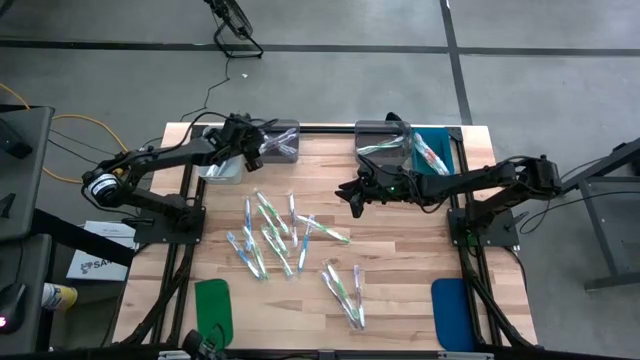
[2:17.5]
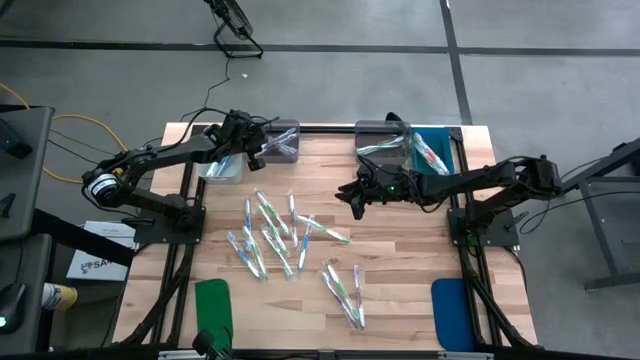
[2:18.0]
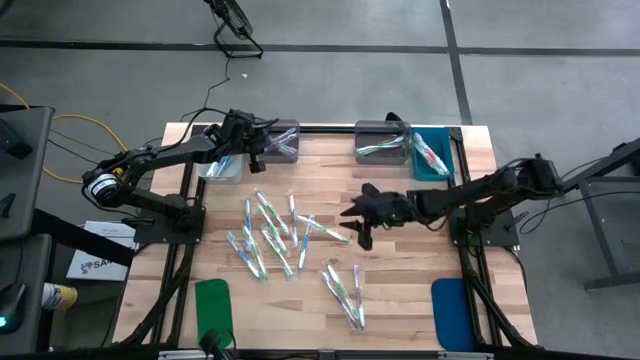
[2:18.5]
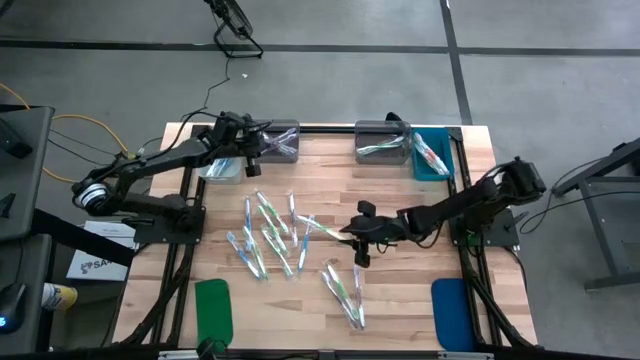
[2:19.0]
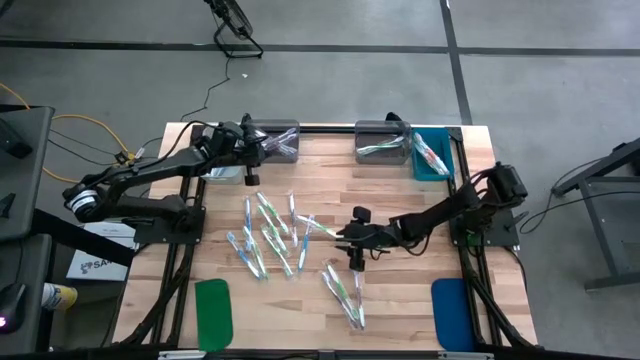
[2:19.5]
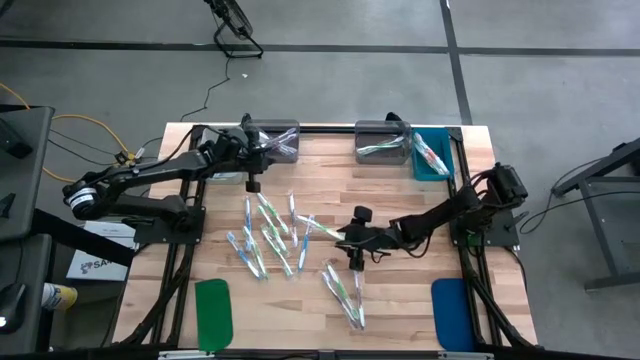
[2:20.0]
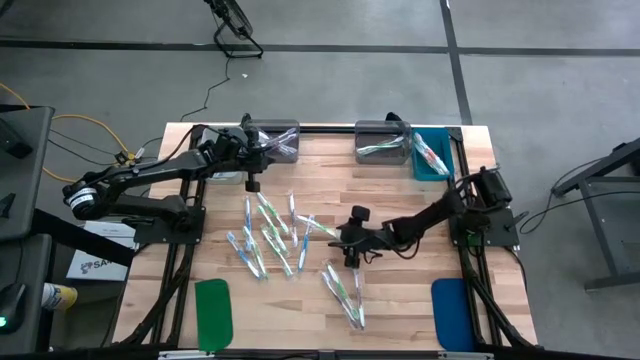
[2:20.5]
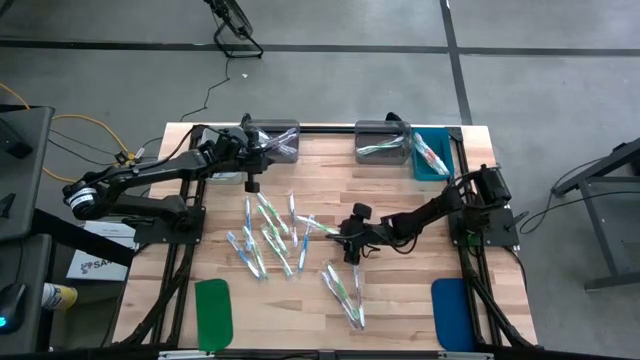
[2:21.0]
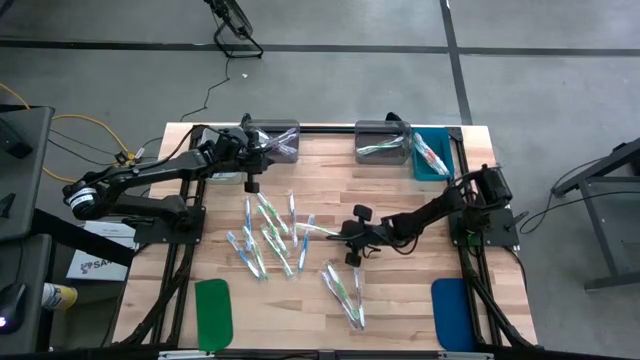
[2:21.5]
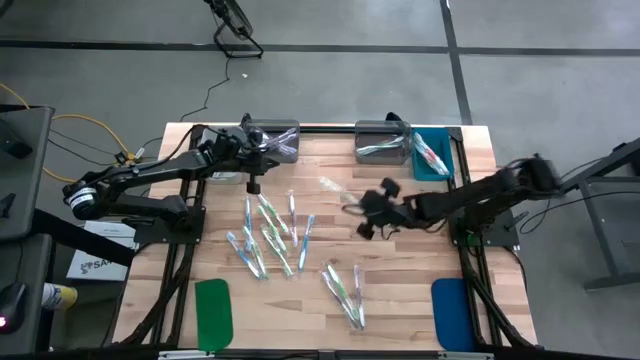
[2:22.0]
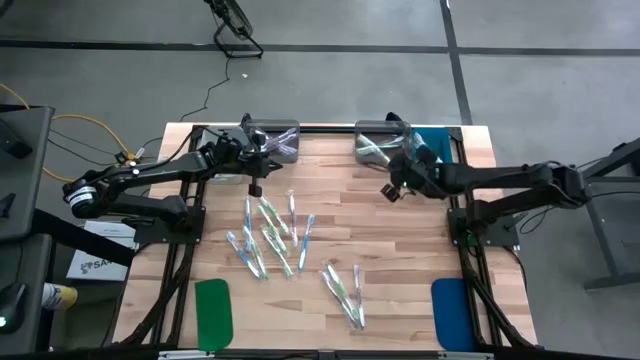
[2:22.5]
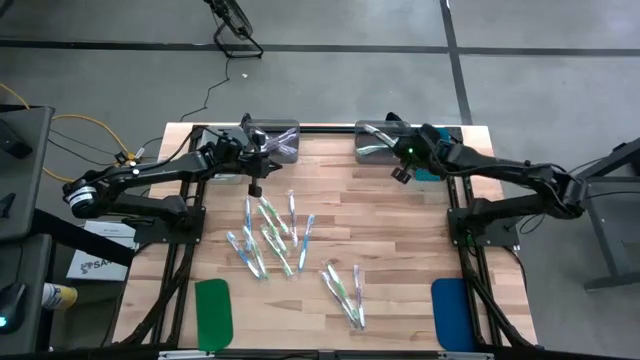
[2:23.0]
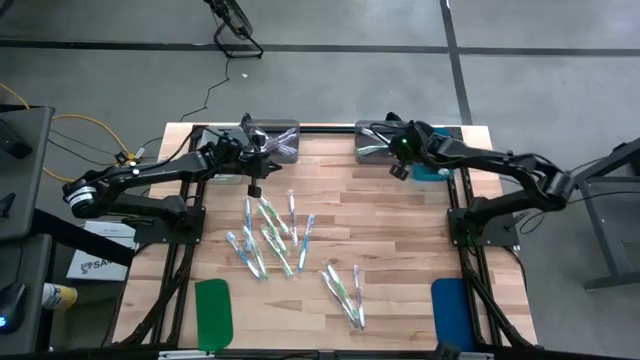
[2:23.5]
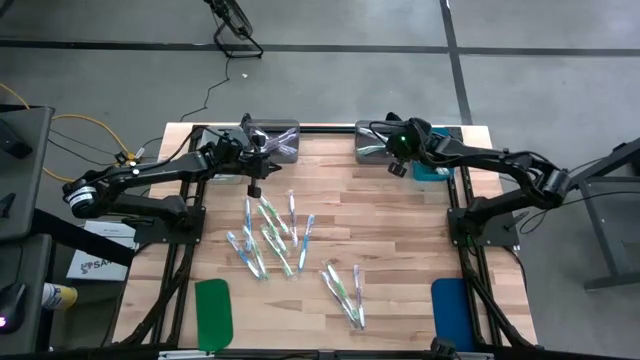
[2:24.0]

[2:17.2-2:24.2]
Task: Pick & Place Toothbrushes
Put the green toothbrush into the right black bin

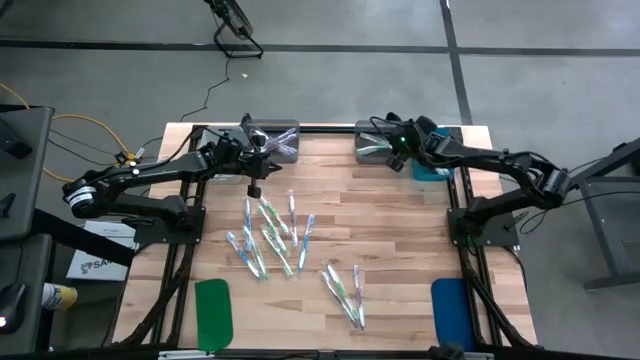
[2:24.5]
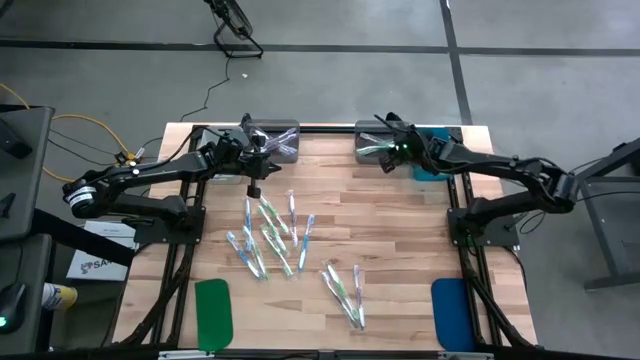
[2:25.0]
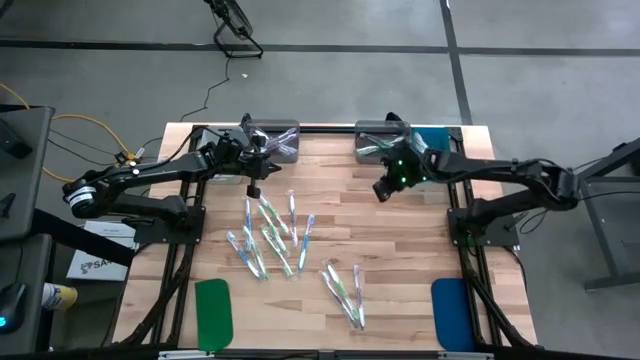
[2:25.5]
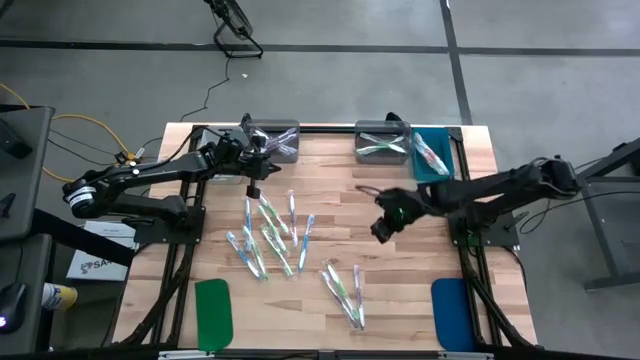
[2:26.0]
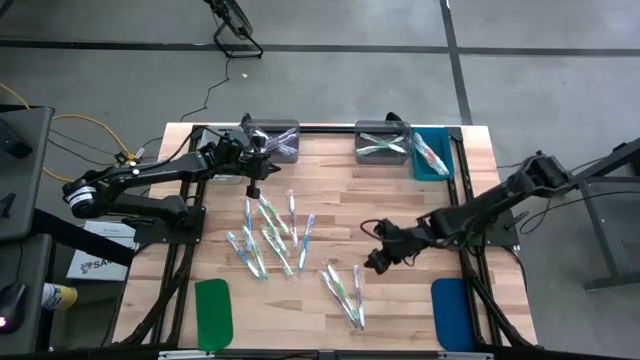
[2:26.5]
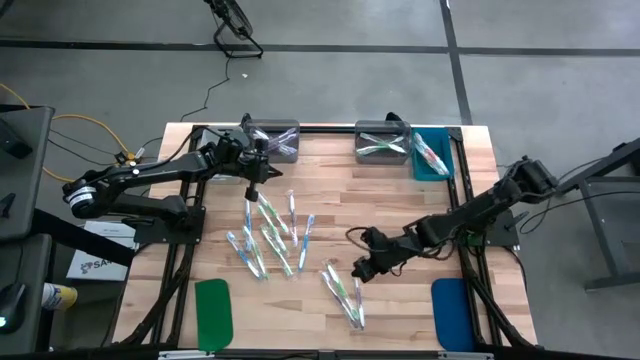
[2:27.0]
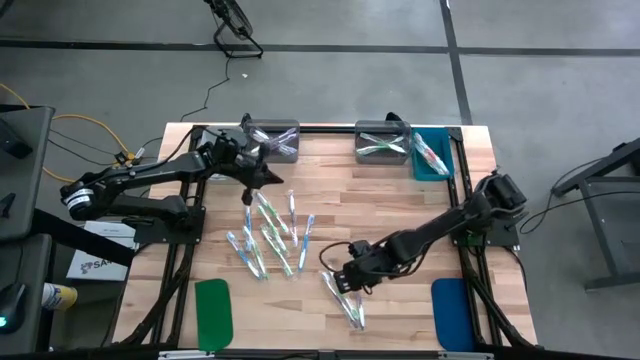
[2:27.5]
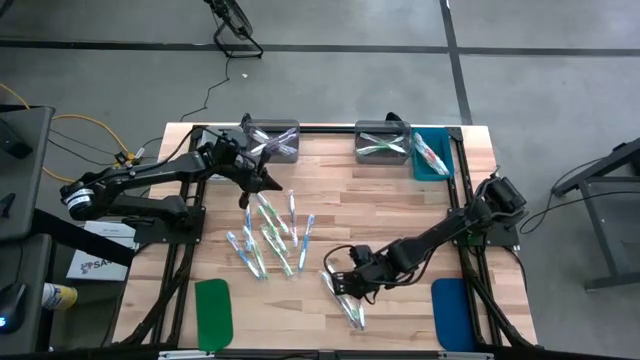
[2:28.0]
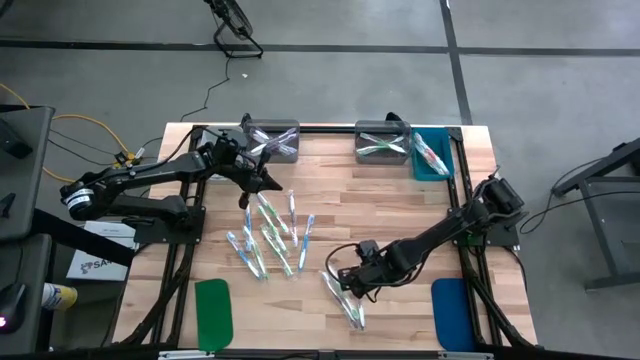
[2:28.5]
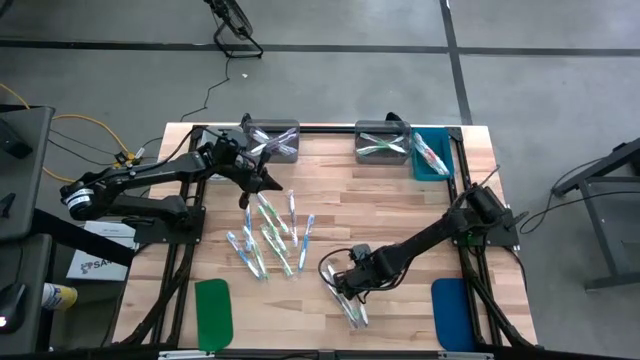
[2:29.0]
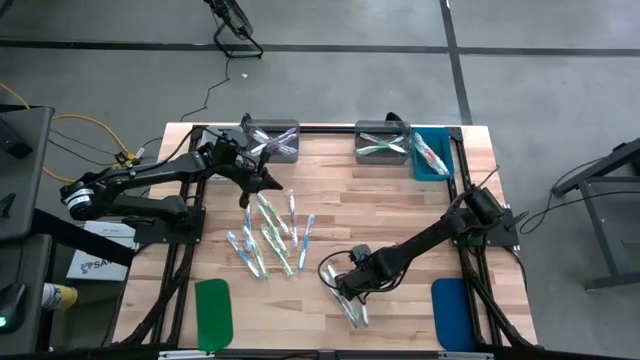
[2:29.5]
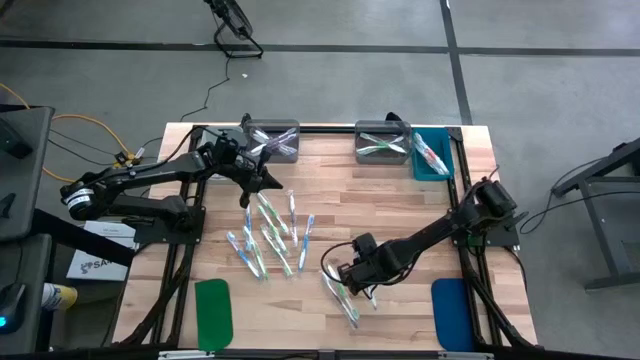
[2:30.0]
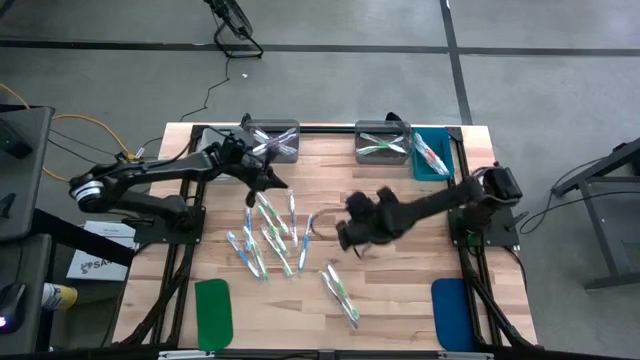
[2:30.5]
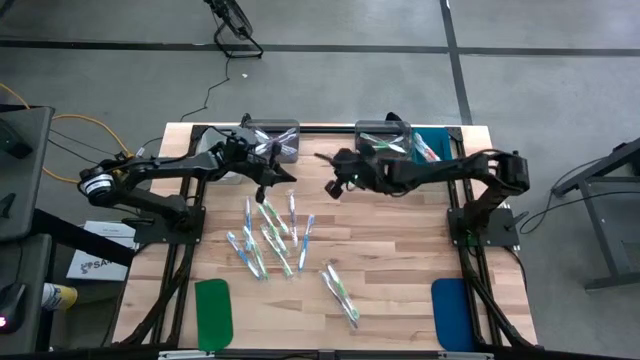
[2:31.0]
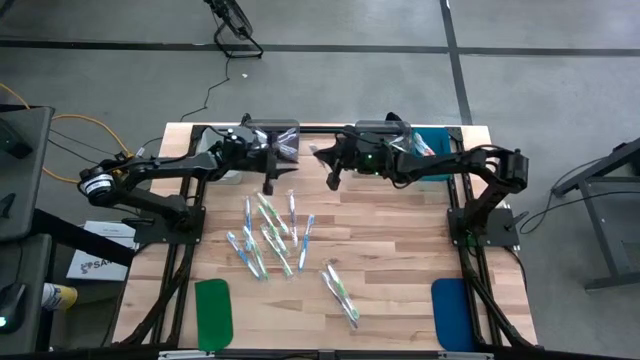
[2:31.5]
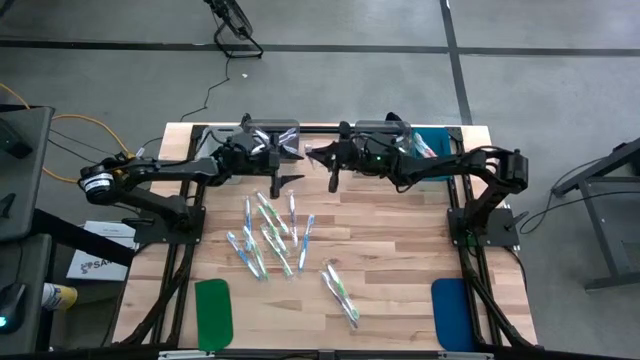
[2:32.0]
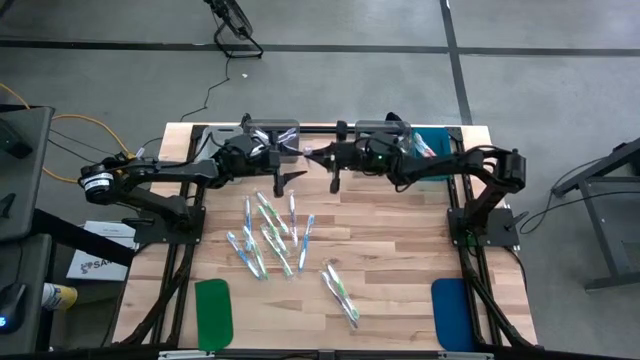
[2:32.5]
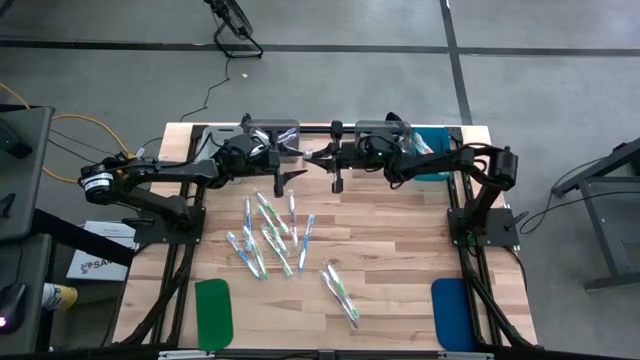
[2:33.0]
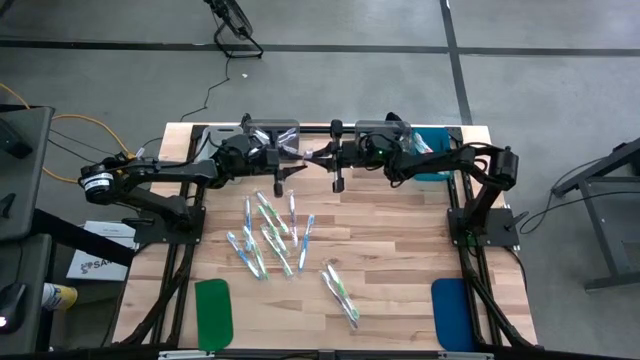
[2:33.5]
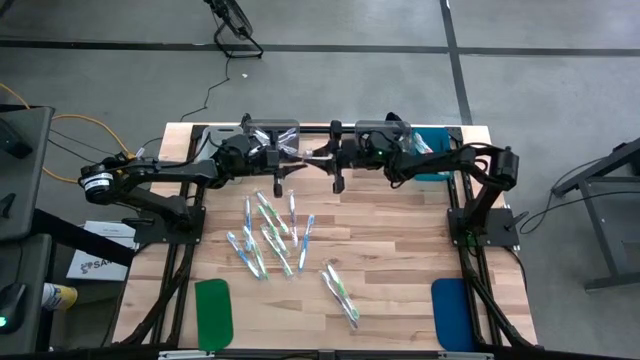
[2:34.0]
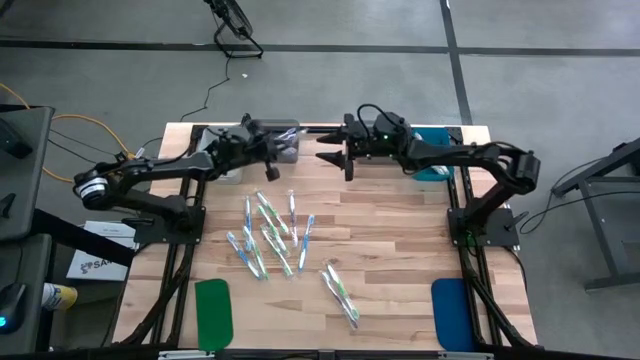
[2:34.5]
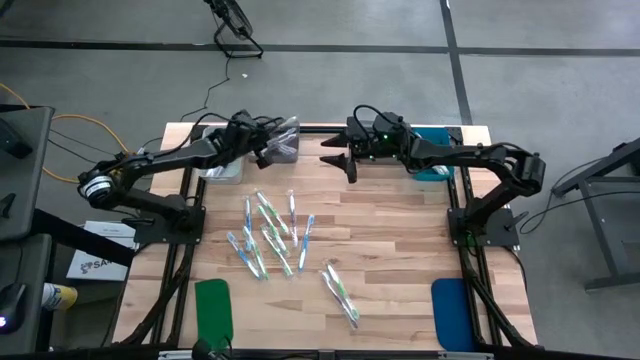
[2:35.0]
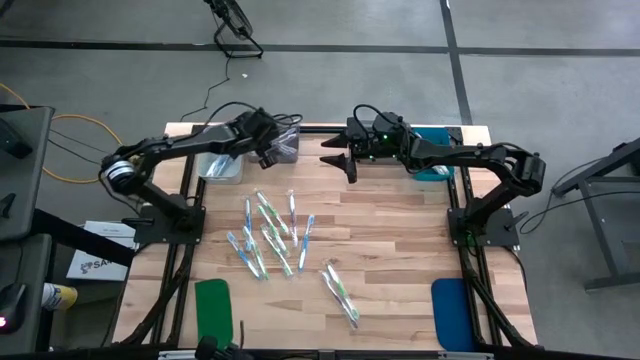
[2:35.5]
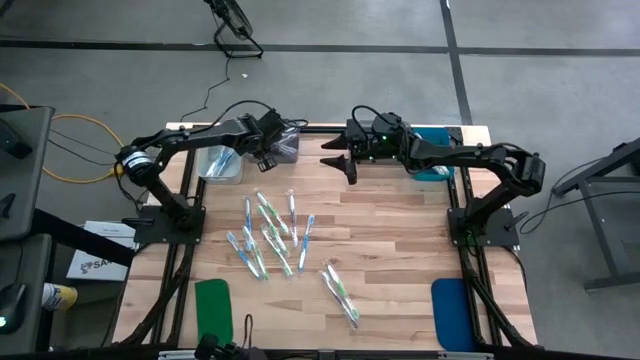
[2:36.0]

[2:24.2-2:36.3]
Put the violet toothbrush into the left black bin

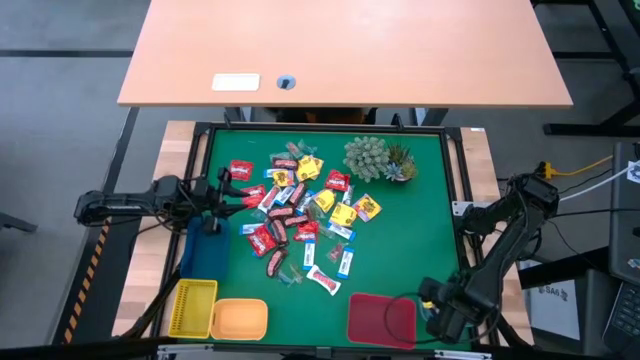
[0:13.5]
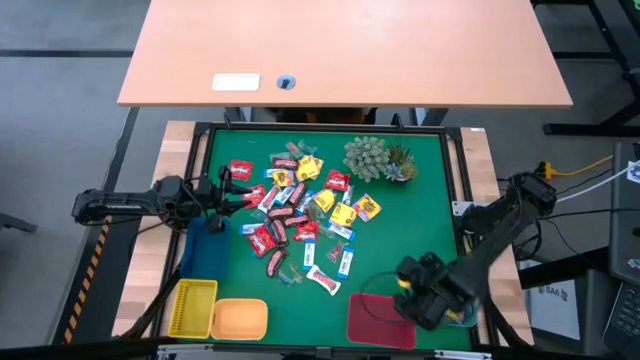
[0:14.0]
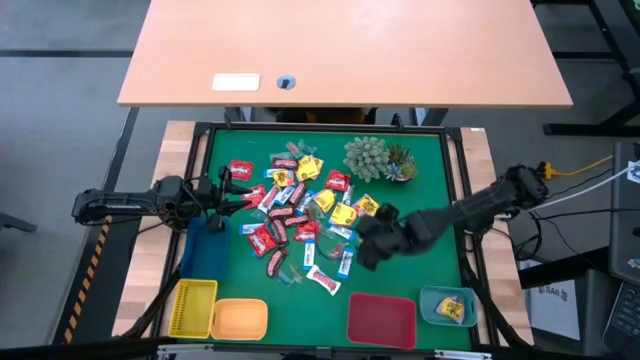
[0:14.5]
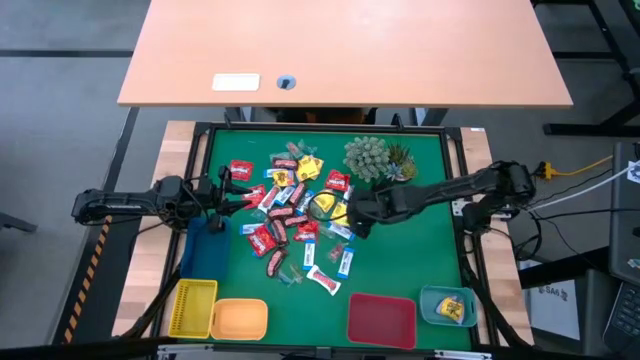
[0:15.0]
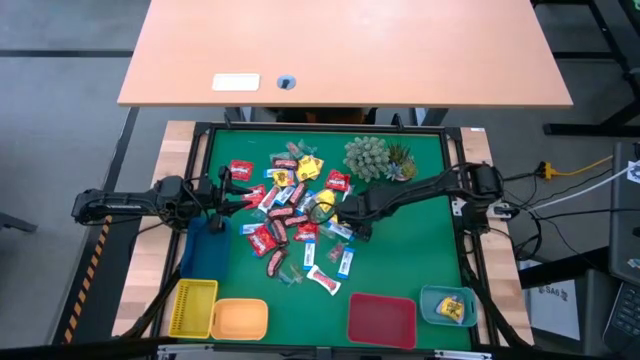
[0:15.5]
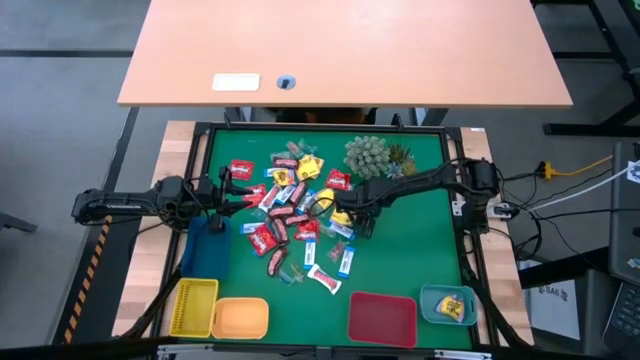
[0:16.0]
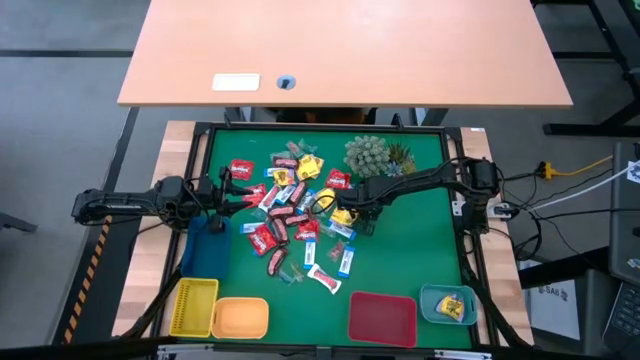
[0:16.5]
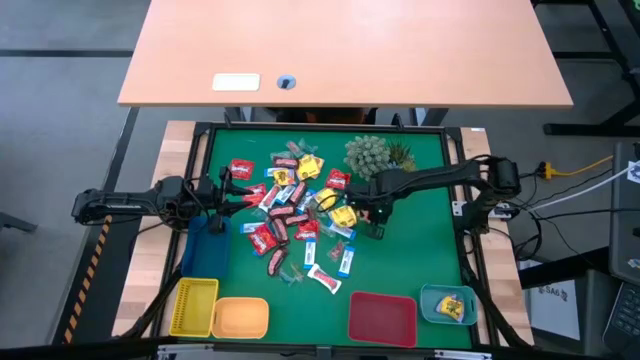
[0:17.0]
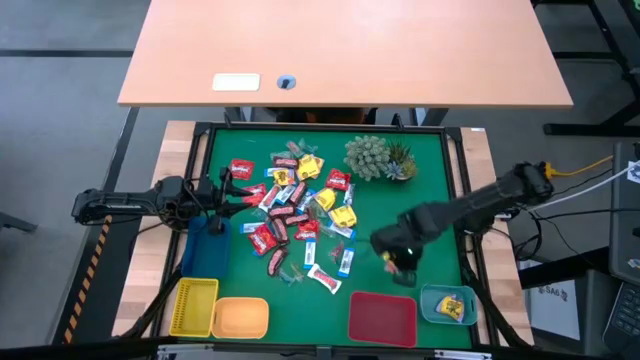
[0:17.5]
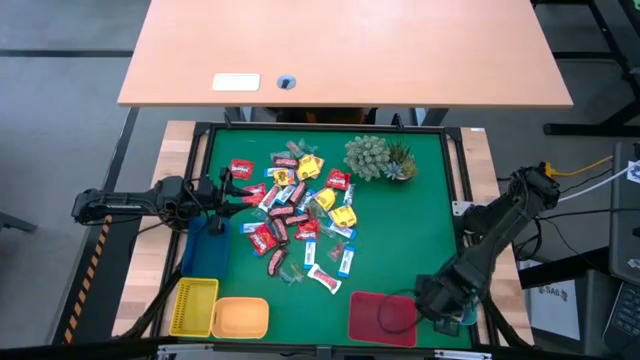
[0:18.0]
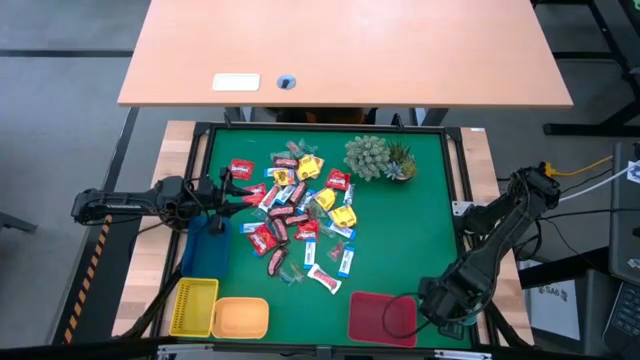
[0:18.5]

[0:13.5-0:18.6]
Task: Sort candy
Put the yellow candy into the green bin
